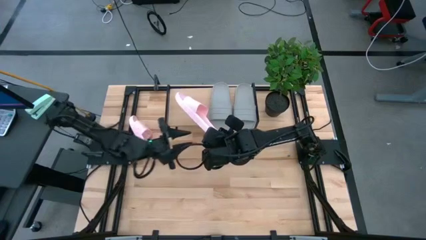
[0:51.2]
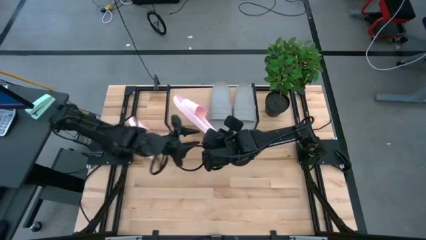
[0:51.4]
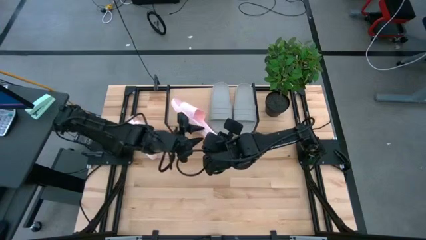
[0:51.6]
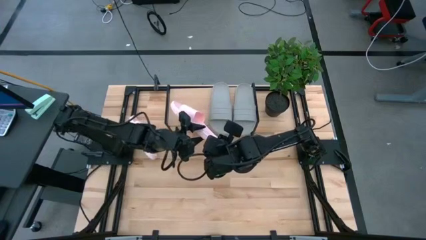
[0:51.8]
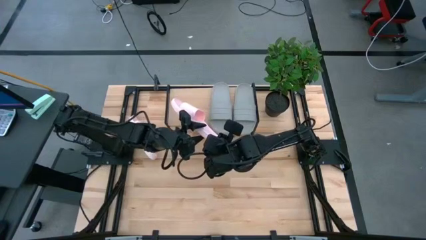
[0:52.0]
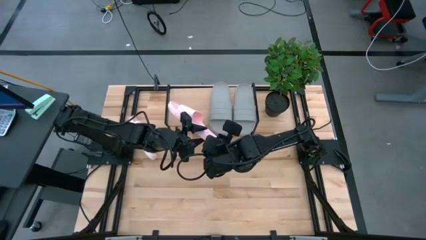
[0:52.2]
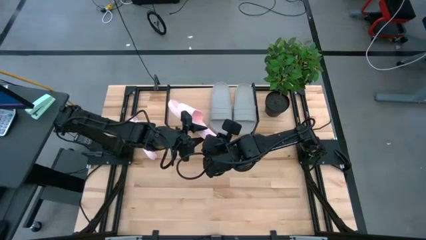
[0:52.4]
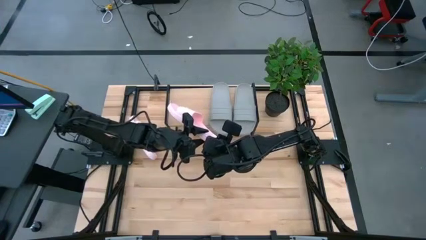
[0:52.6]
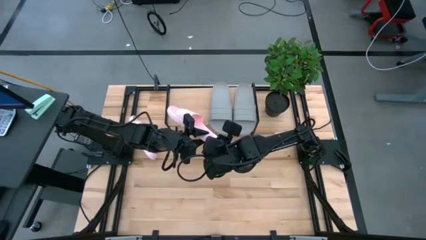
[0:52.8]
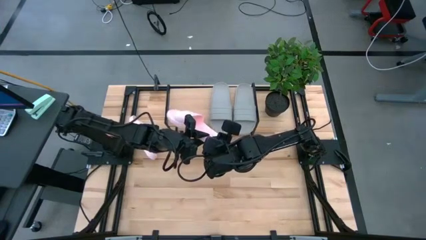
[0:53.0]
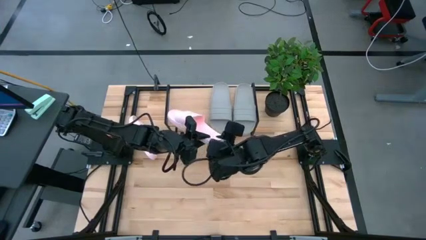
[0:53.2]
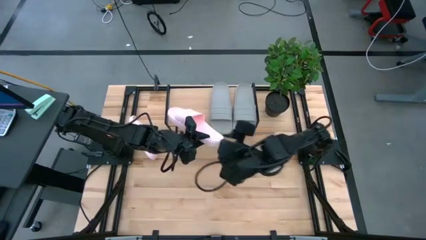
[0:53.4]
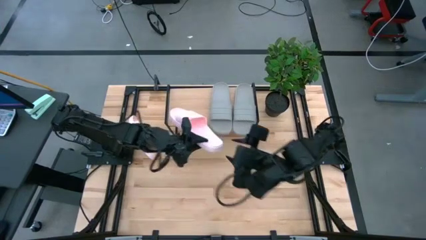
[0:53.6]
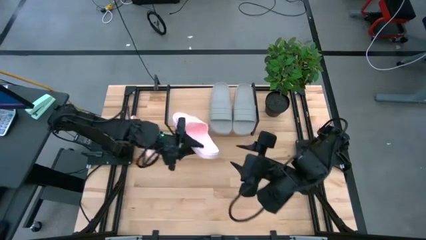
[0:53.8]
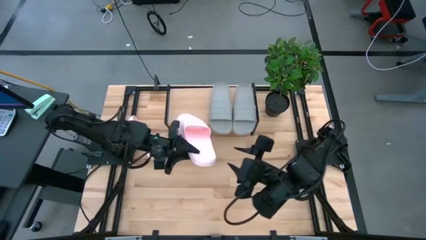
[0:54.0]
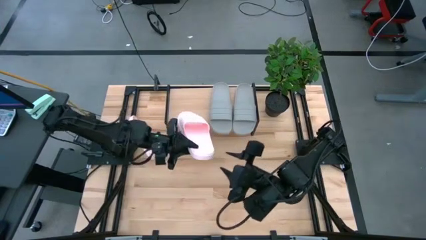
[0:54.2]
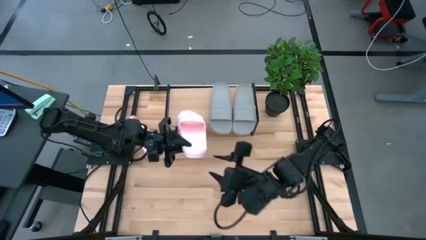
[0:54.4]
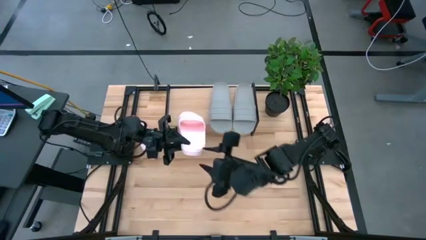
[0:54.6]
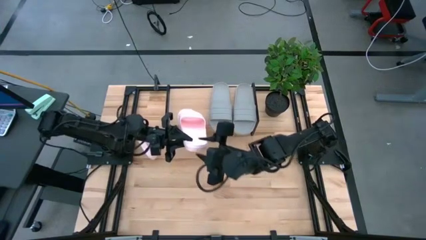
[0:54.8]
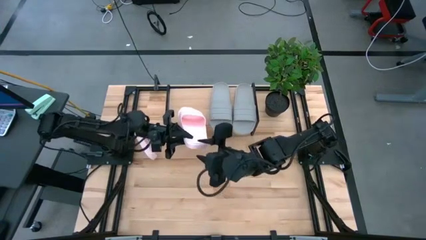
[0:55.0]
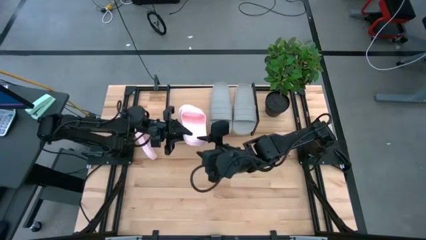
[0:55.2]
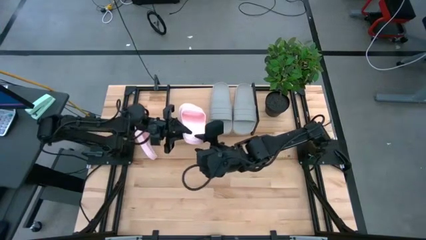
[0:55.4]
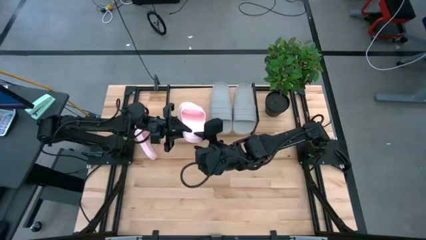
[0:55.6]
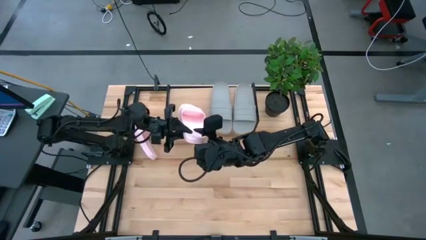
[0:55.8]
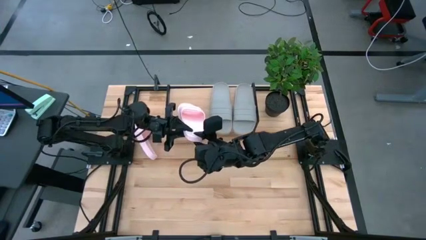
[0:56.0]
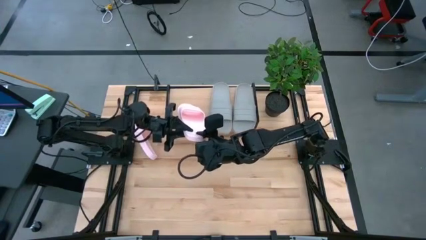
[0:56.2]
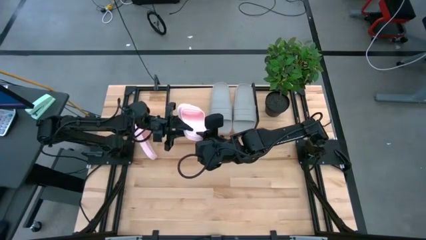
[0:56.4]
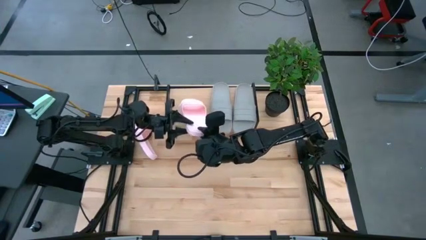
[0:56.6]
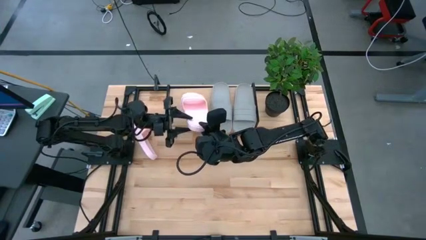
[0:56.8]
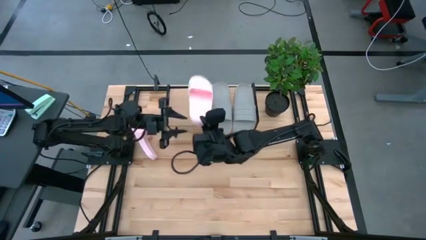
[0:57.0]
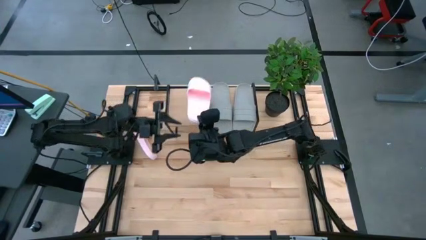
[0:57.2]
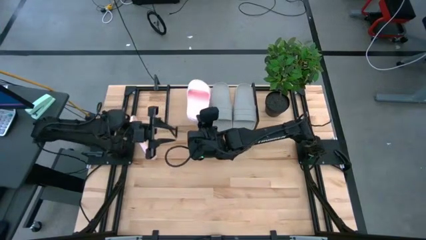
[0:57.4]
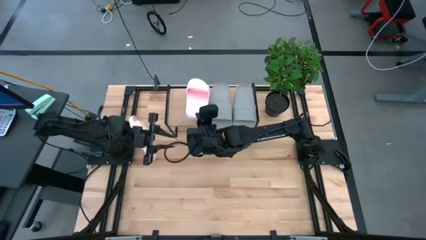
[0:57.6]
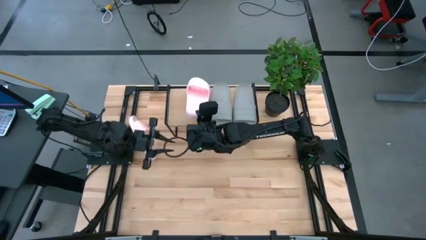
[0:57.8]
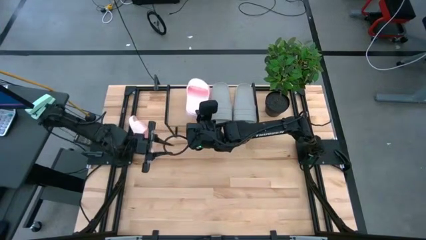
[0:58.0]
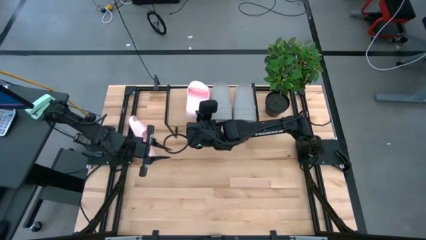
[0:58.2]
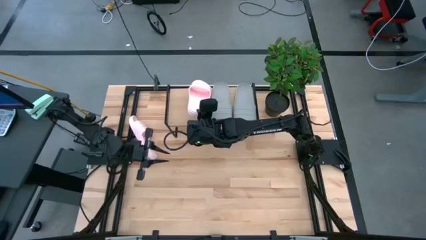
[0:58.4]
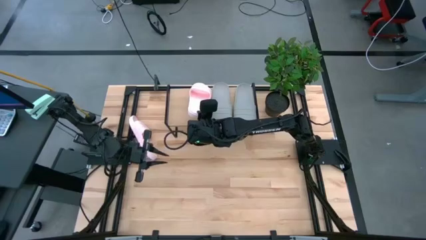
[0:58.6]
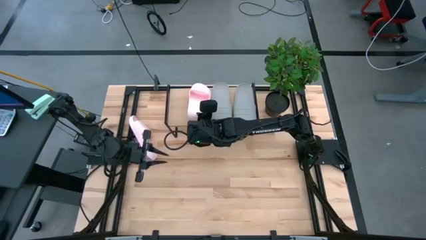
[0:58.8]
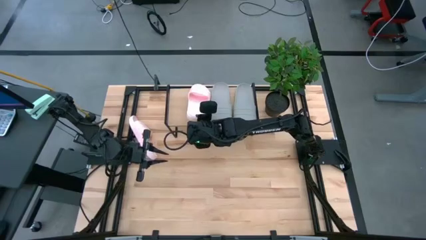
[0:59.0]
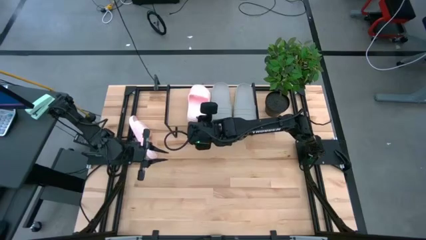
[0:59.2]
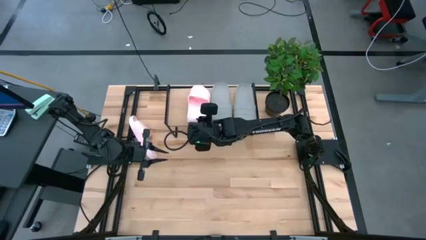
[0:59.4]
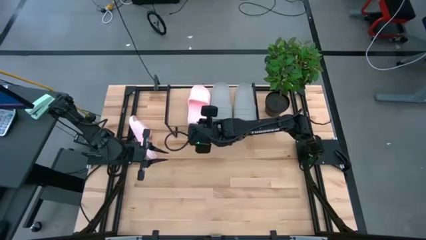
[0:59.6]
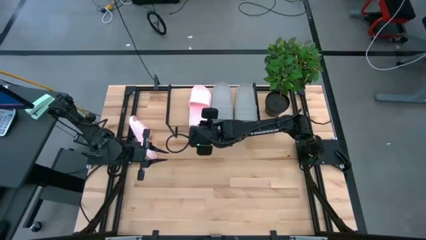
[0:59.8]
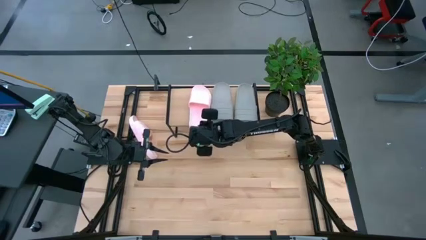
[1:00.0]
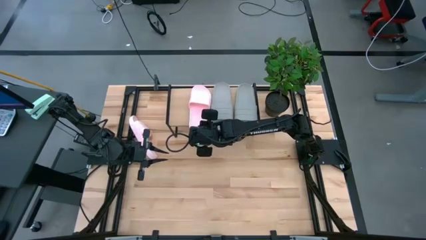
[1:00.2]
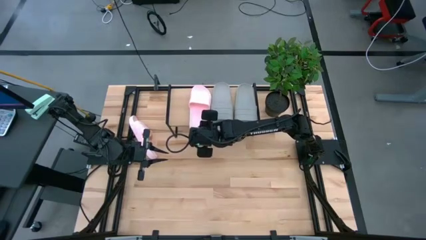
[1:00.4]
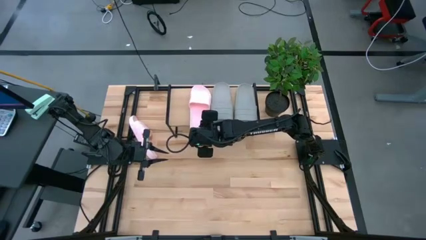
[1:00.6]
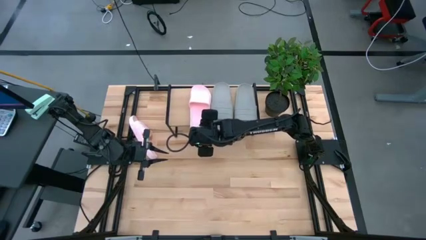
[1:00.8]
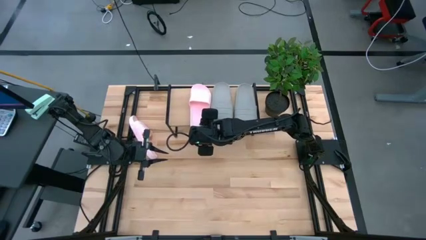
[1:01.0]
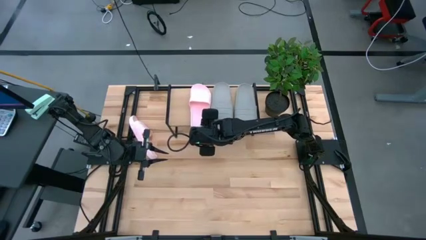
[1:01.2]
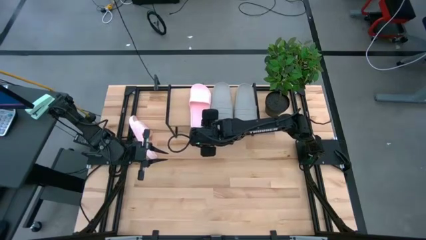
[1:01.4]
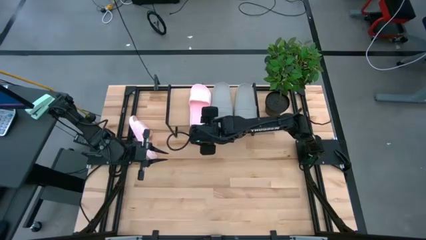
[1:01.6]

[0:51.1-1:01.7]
Task: Pick and place slides into the shelf
Put the right pink slide onto the shelf
